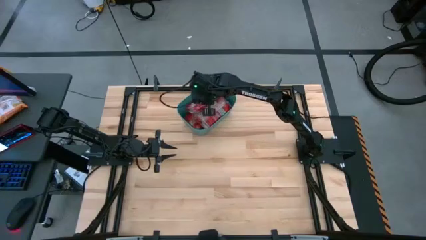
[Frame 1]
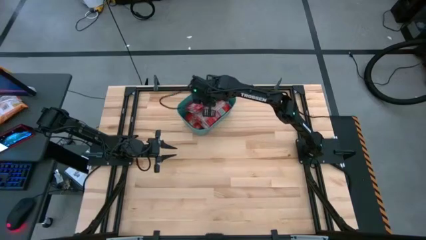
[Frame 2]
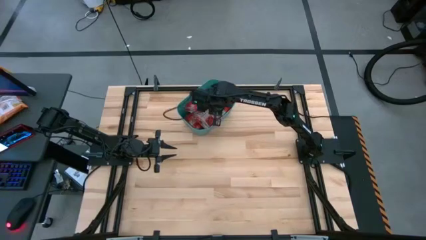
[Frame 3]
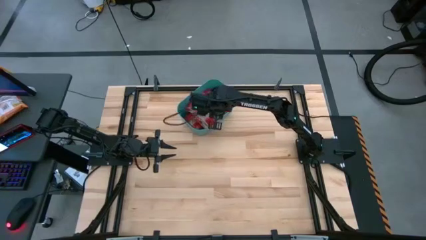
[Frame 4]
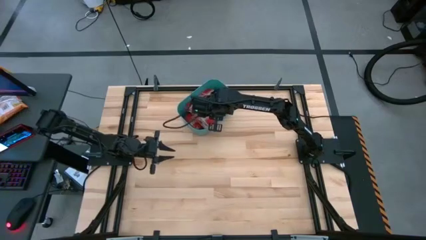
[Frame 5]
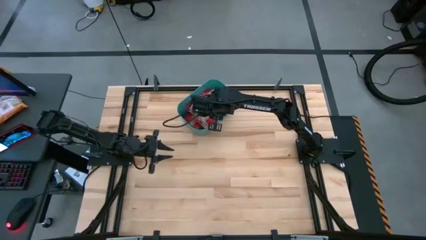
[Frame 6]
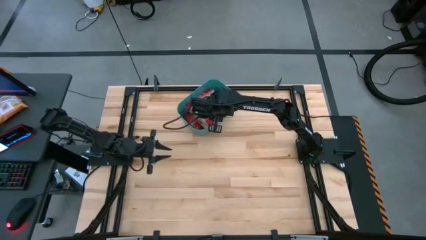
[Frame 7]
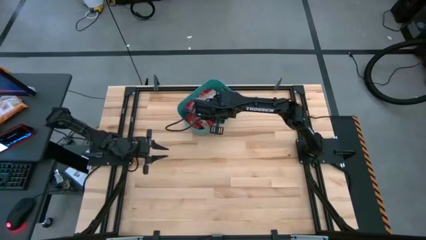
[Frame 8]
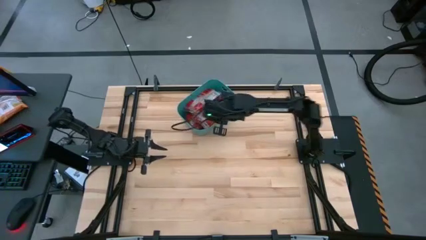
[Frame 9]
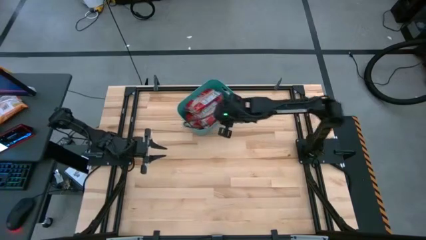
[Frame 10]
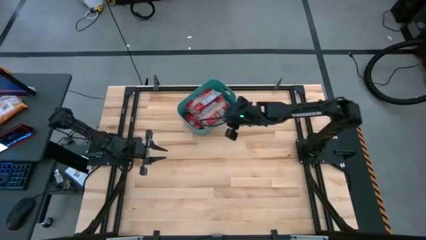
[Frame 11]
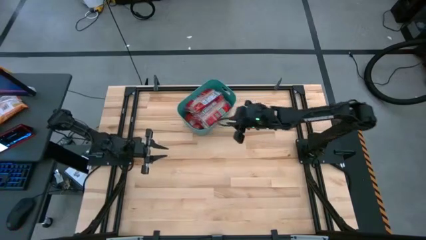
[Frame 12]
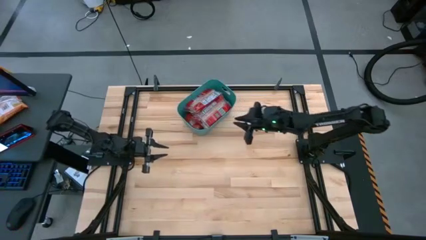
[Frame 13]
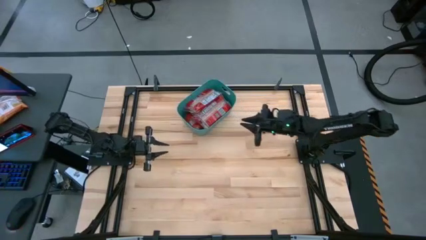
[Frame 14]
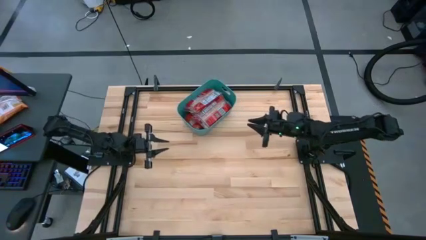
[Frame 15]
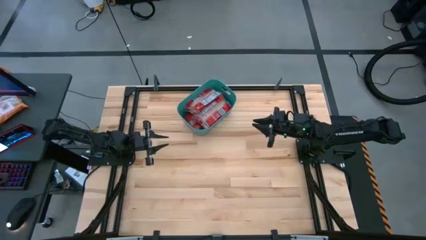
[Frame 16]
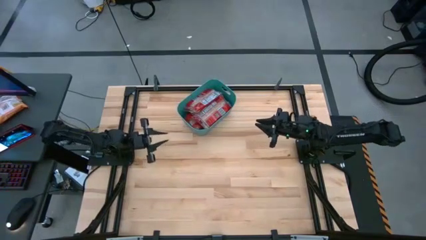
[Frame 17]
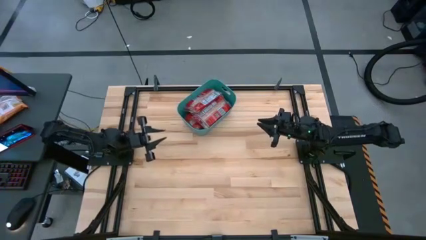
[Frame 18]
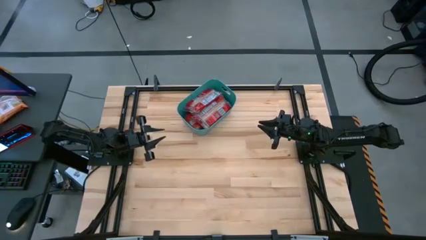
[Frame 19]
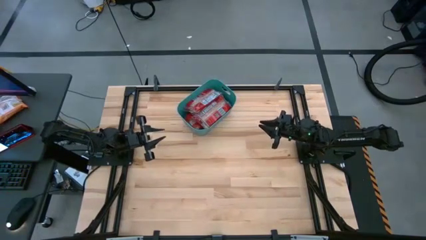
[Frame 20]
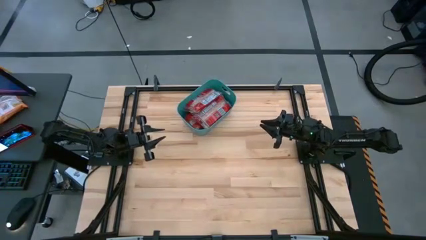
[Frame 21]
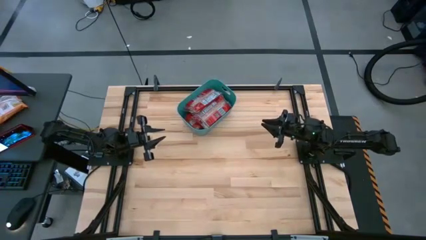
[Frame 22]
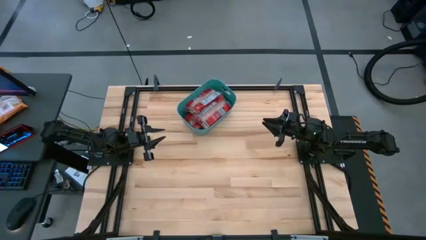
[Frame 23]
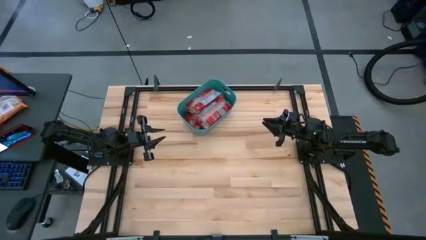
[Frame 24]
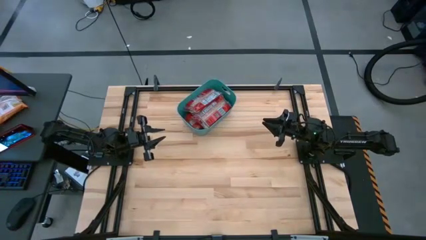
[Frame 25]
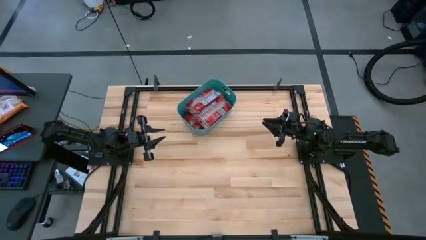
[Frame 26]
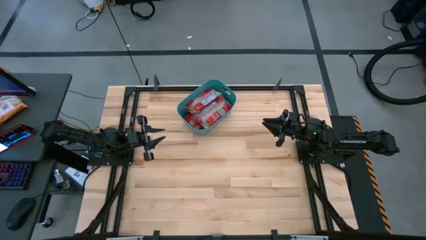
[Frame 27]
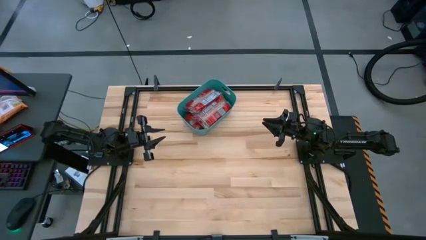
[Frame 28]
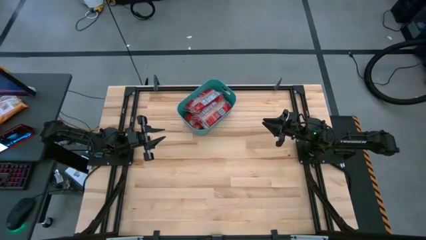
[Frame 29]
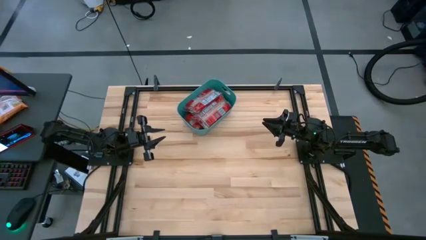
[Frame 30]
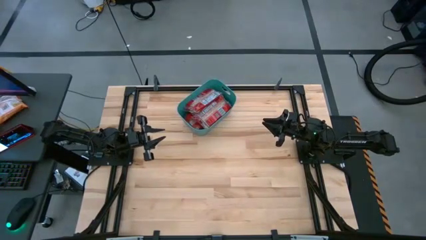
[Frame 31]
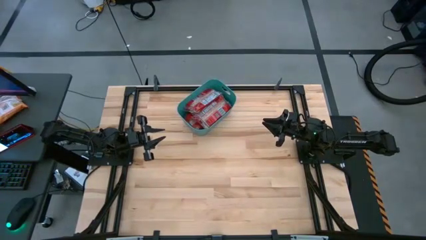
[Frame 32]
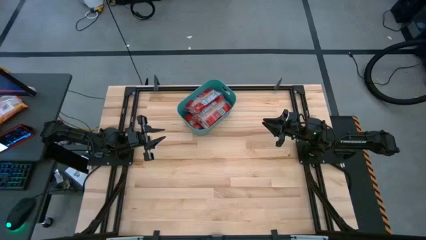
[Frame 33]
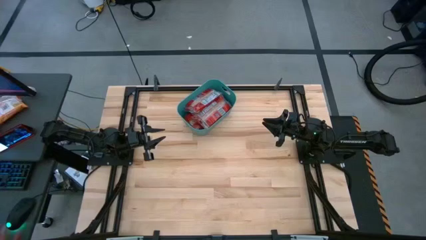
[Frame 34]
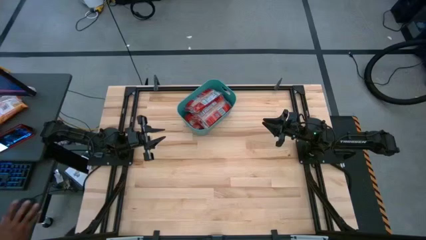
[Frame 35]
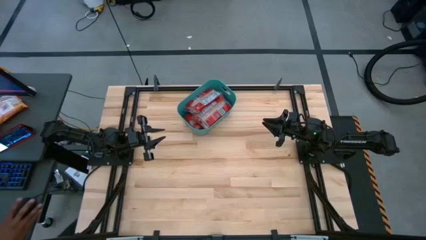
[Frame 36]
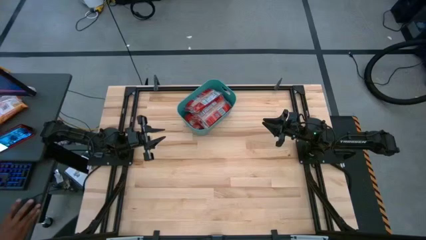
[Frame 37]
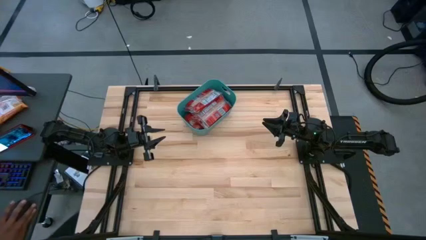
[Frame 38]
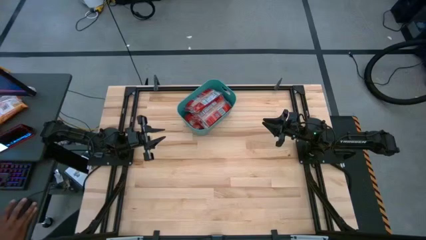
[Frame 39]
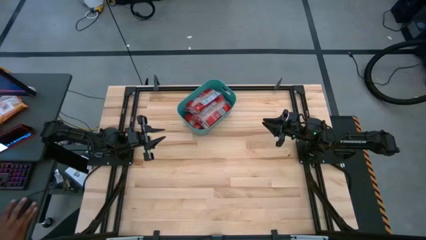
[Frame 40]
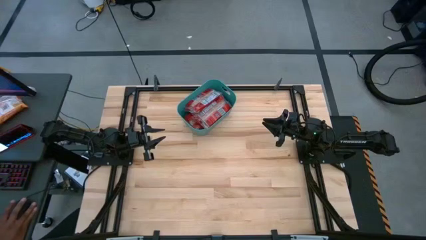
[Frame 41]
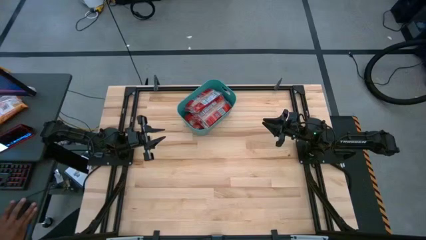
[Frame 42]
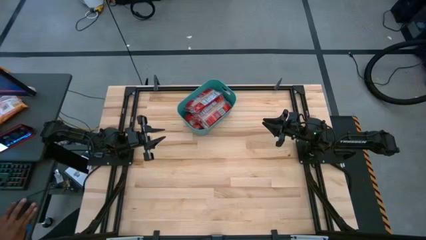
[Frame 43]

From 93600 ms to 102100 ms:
Task: Sort popcorn bags into baskets
Return to Home Position

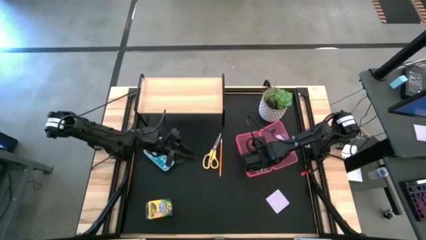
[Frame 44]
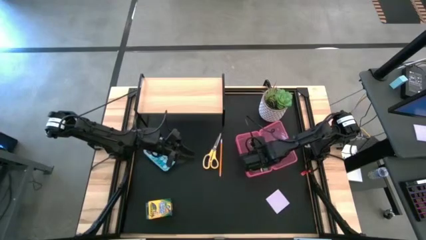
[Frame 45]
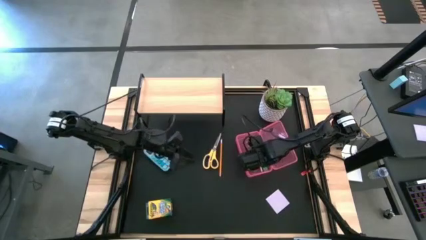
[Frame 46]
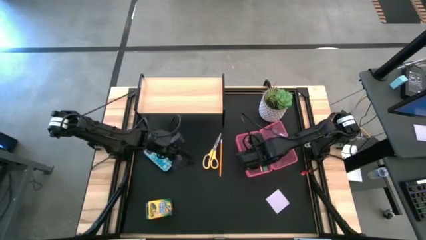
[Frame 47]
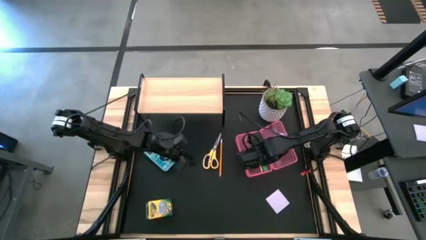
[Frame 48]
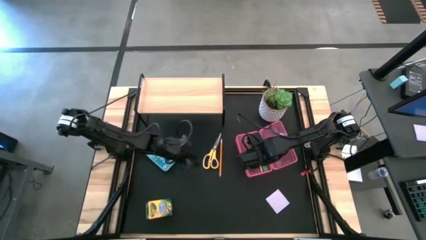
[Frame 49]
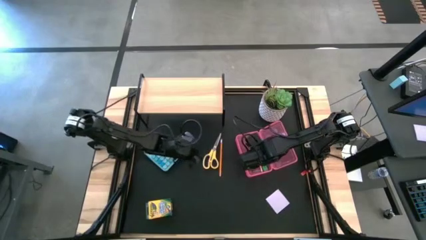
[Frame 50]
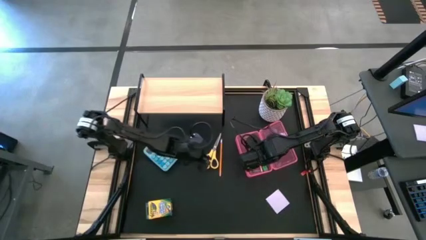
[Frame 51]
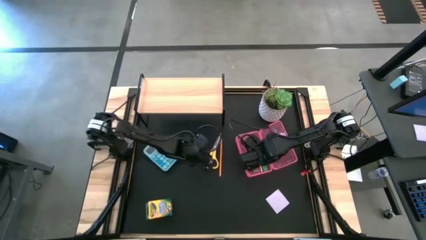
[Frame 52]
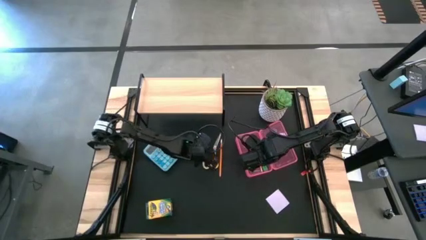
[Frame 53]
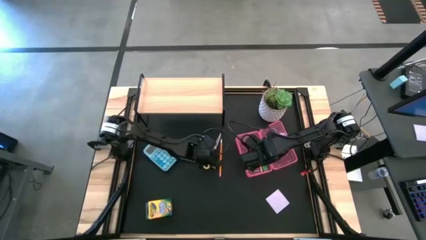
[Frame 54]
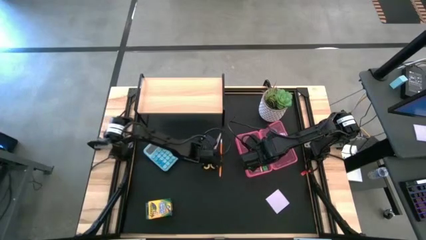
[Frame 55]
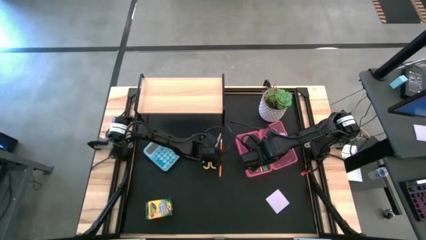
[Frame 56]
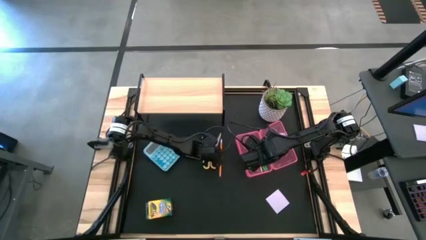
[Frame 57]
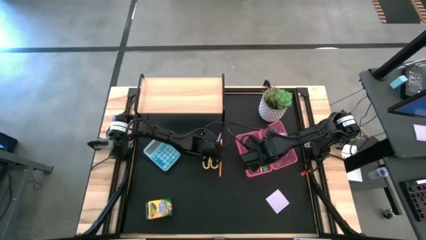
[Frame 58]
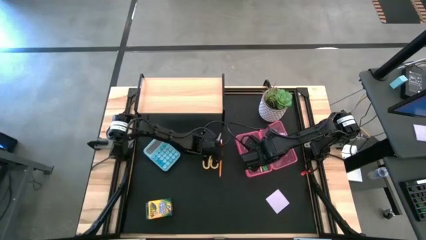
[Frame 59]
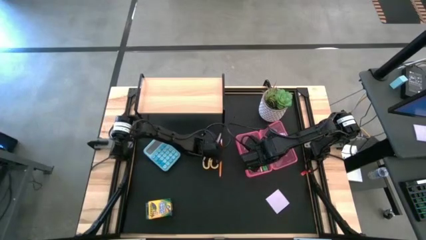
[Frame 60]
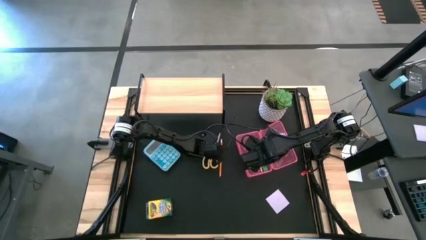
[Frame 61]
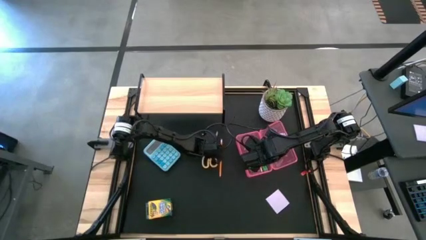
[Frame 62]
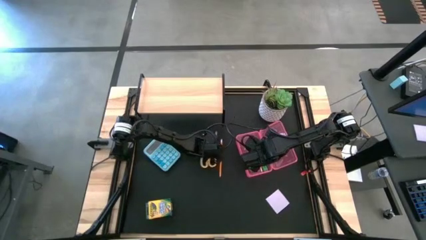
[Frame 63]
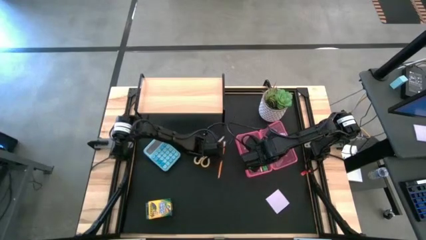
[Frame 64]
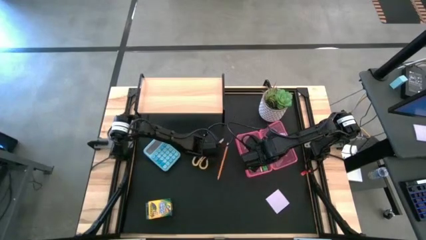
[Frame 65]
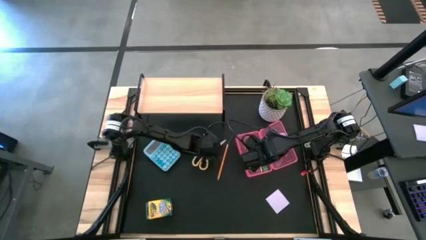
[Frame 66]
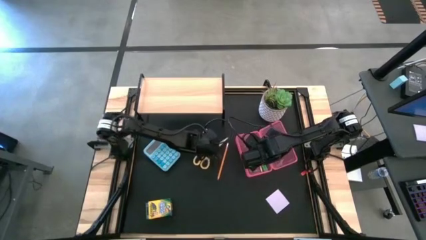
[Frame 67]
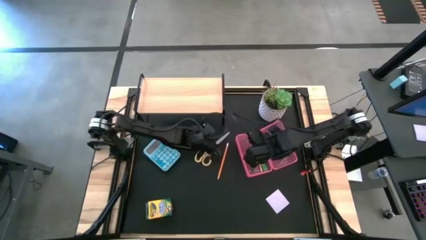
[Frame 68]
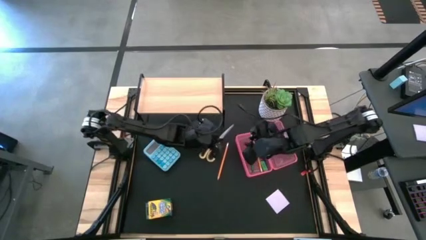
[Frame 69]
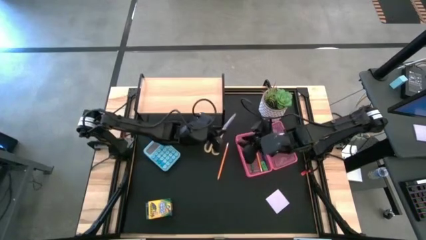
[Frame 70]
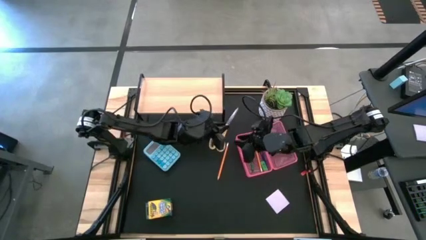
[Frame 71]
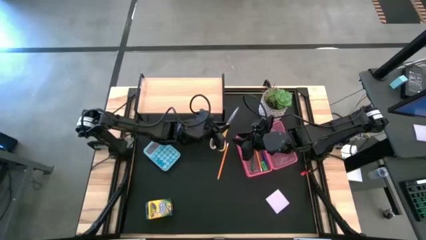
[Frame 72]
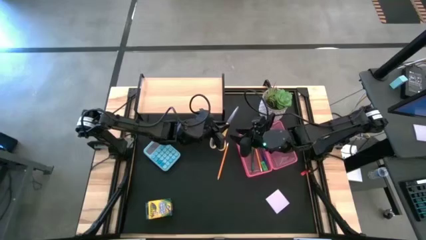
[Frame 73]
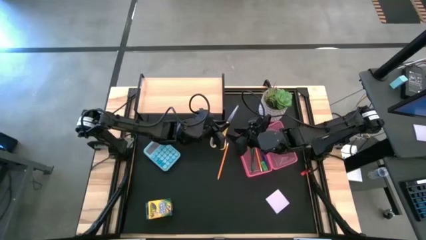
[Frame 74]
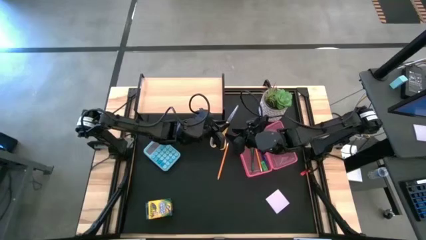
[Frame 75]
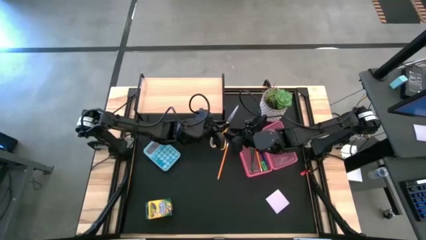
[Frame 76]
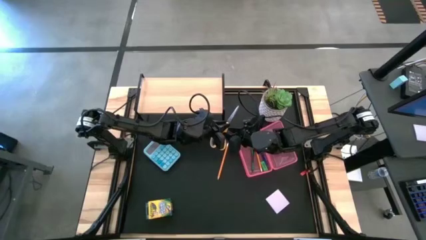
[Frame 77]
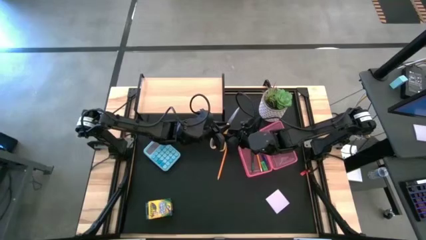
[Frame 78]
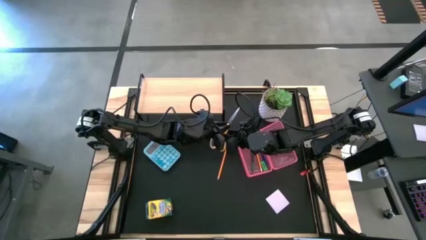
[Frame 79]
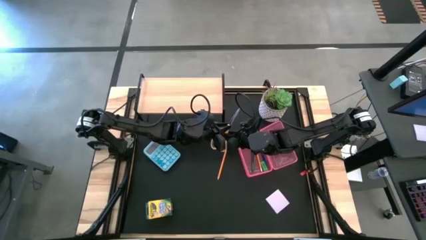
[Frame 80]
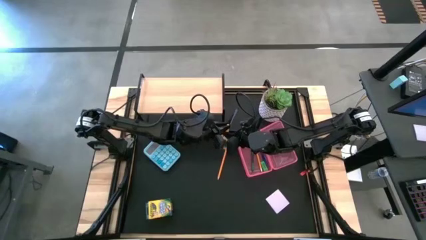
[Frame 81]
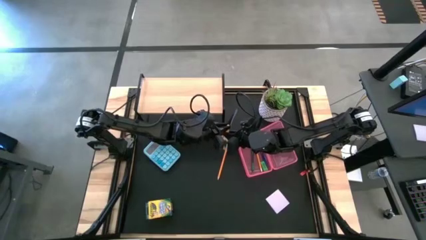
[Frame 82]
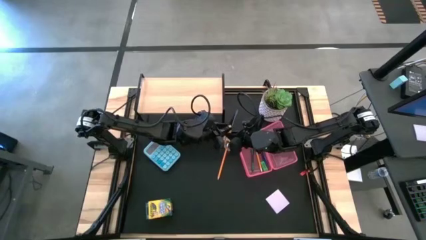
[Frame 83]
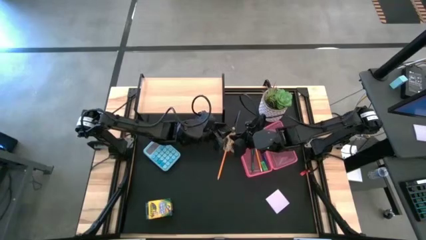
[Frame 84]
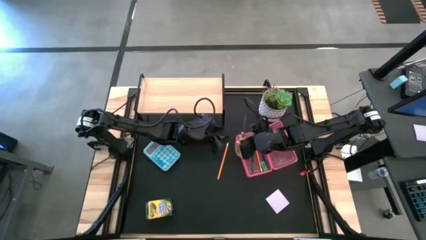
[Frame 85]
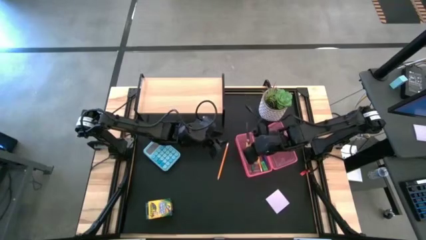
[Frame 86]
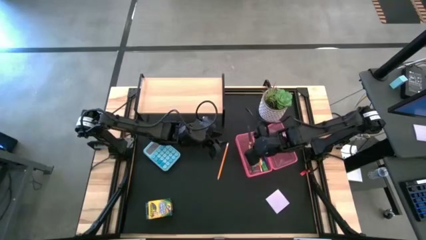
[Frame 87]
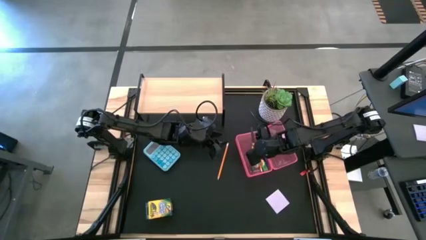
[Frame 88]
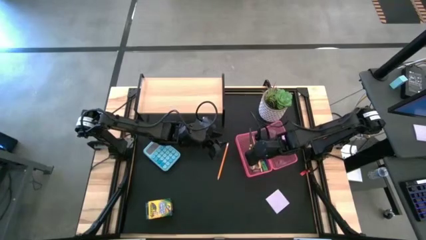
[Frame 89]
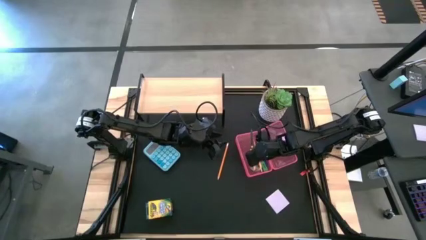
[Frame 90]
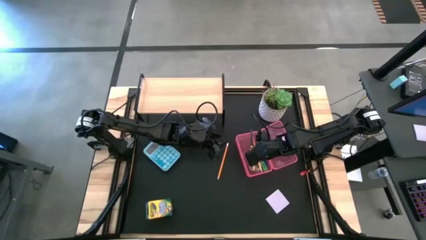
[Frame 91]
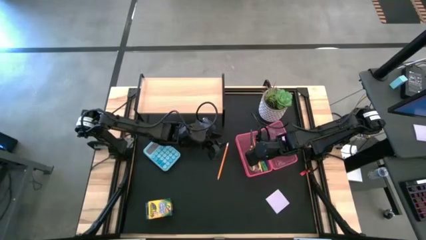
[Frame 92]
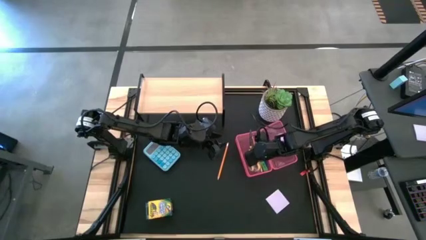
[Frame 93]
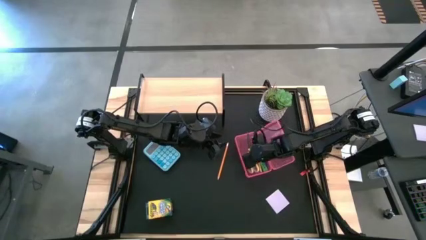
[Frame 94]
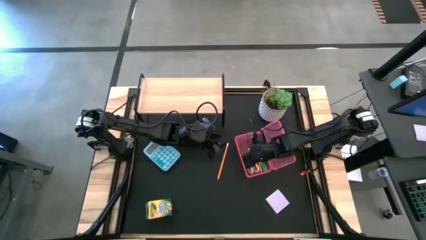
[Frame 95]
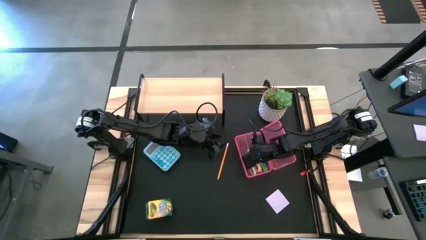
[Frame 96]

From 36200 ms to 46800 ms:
Task: Pack school essentials
Put the yellow scissors into the pink supply box
